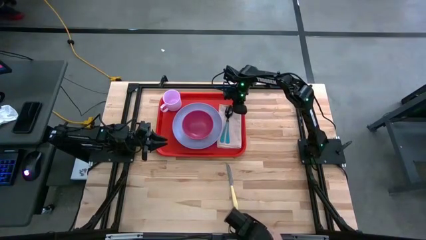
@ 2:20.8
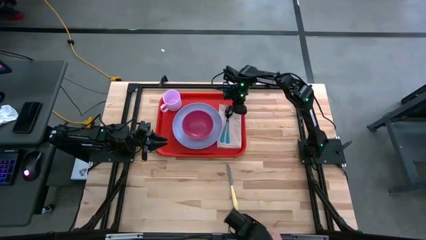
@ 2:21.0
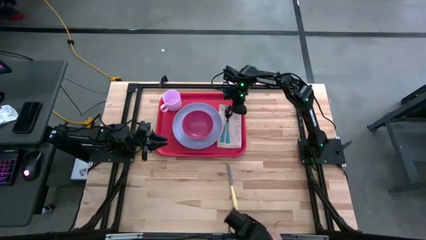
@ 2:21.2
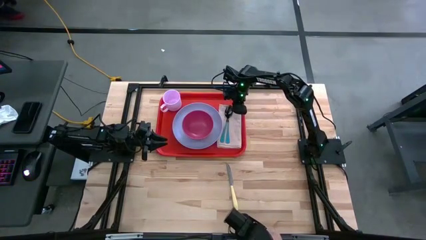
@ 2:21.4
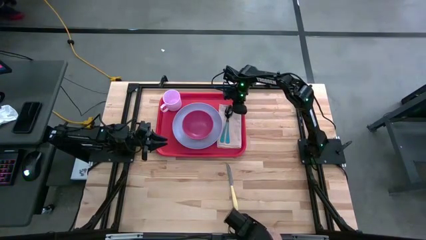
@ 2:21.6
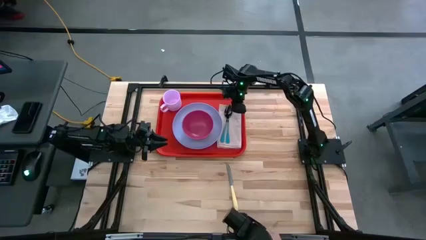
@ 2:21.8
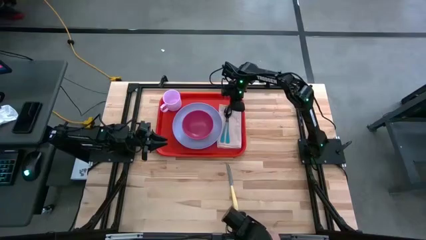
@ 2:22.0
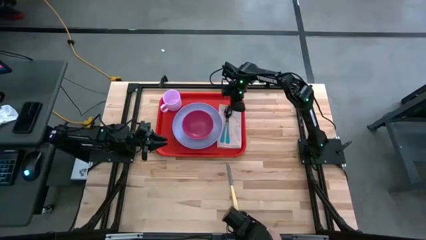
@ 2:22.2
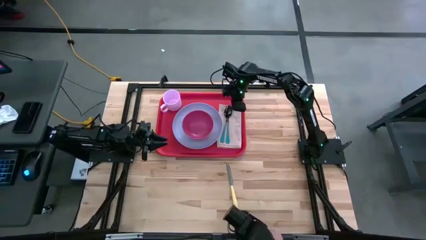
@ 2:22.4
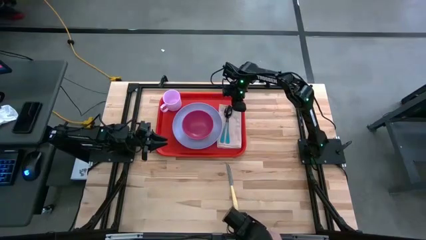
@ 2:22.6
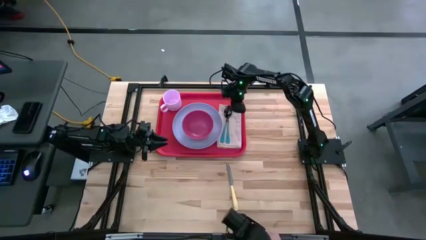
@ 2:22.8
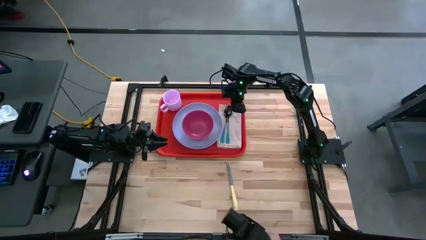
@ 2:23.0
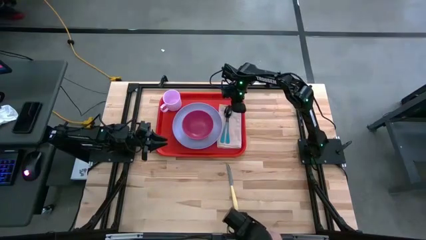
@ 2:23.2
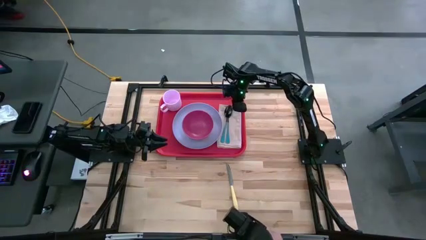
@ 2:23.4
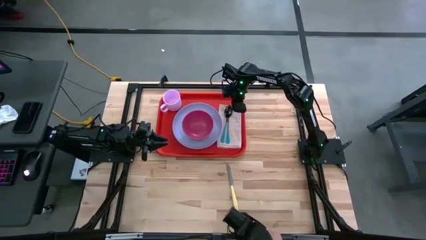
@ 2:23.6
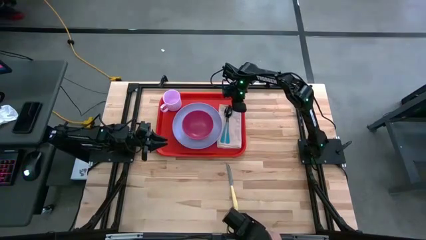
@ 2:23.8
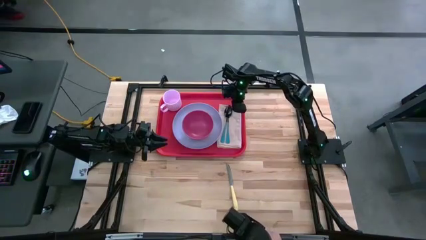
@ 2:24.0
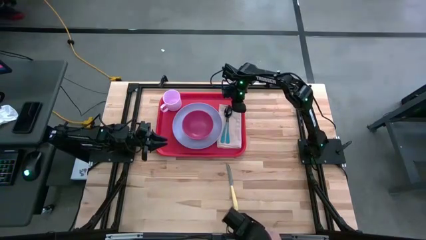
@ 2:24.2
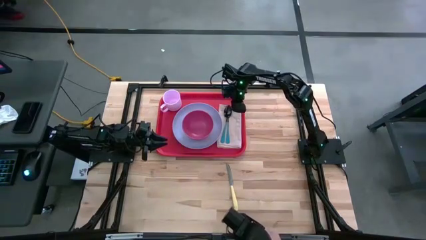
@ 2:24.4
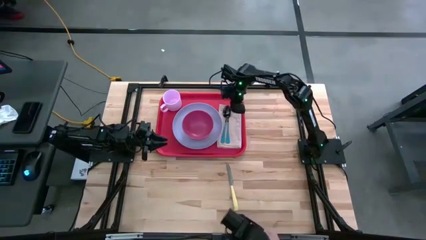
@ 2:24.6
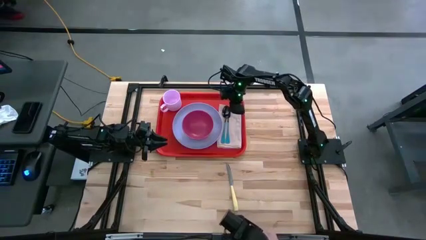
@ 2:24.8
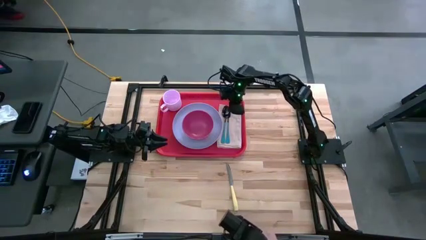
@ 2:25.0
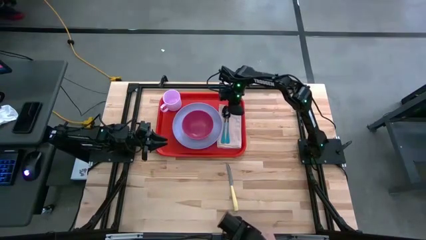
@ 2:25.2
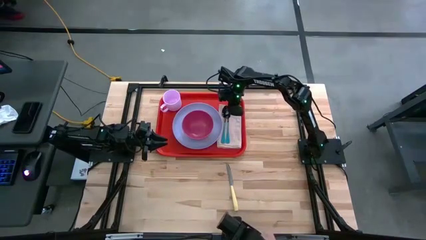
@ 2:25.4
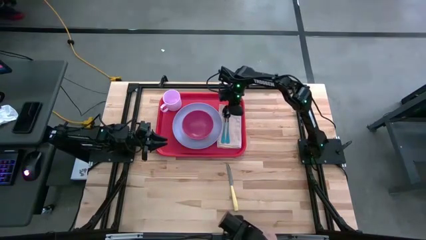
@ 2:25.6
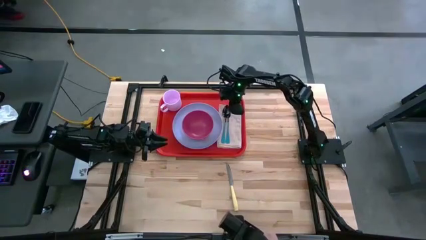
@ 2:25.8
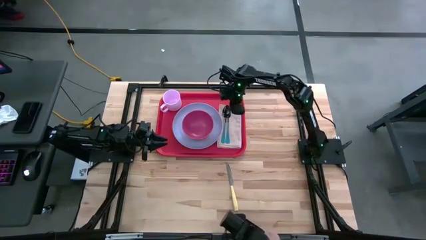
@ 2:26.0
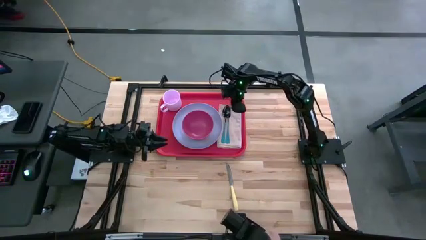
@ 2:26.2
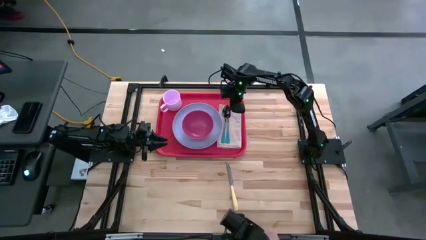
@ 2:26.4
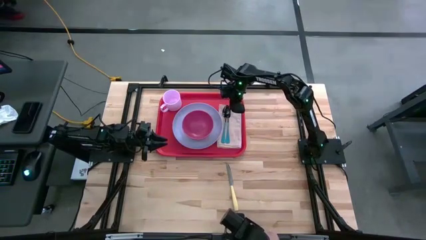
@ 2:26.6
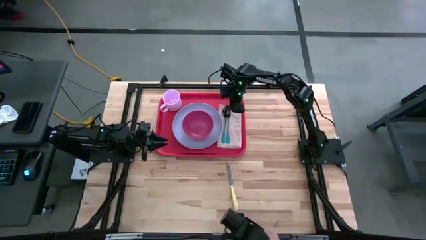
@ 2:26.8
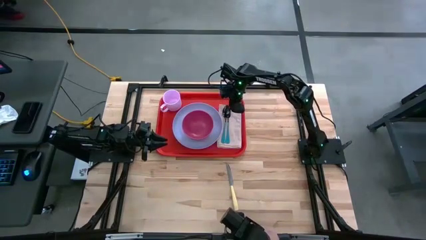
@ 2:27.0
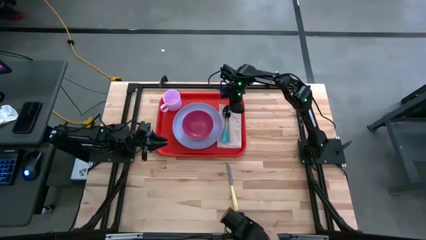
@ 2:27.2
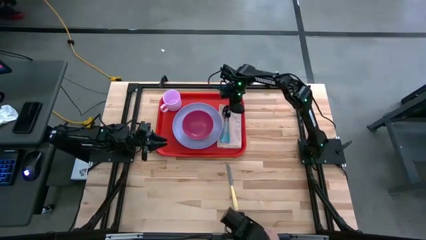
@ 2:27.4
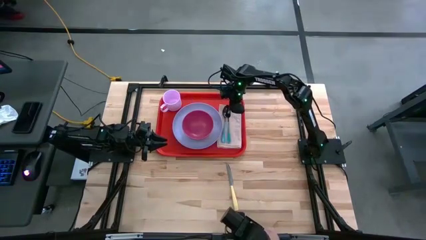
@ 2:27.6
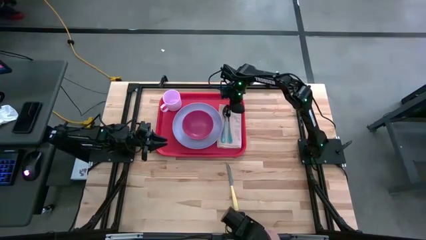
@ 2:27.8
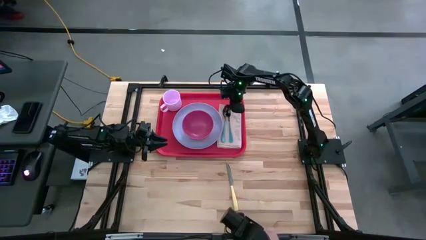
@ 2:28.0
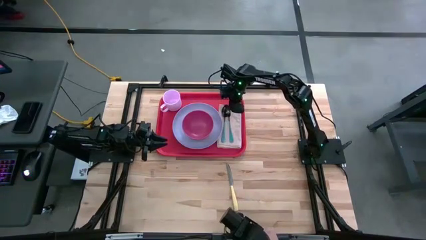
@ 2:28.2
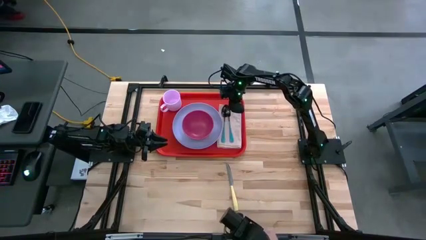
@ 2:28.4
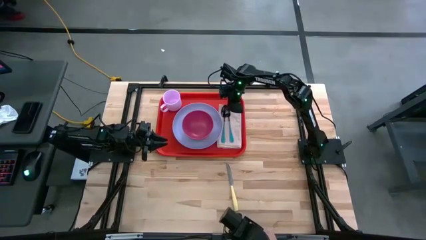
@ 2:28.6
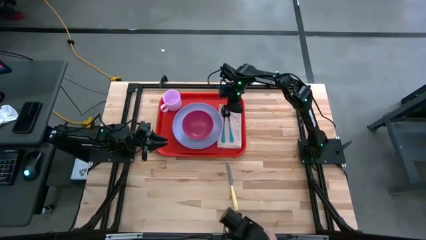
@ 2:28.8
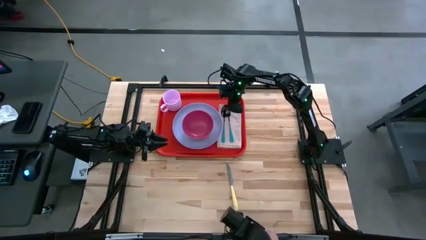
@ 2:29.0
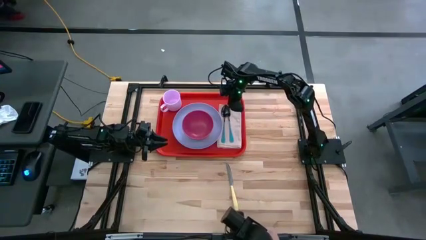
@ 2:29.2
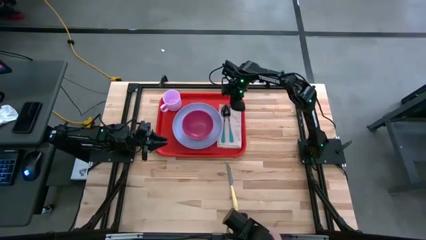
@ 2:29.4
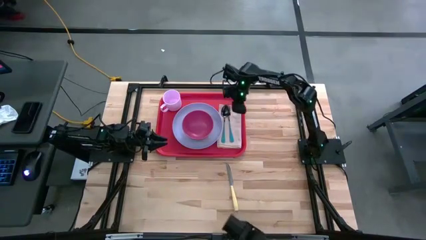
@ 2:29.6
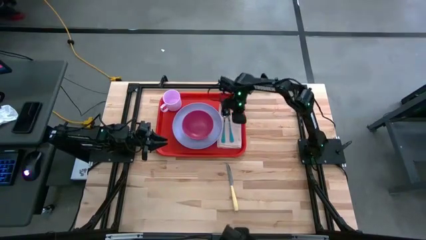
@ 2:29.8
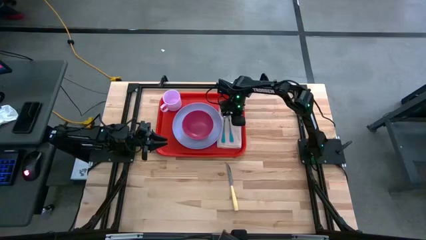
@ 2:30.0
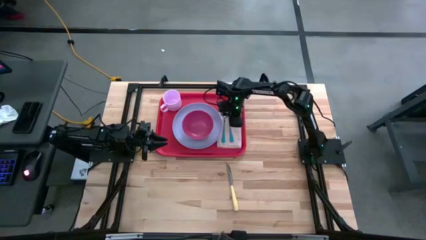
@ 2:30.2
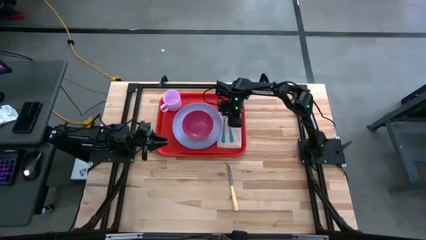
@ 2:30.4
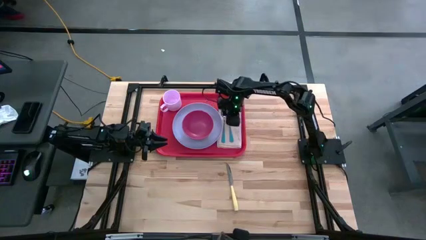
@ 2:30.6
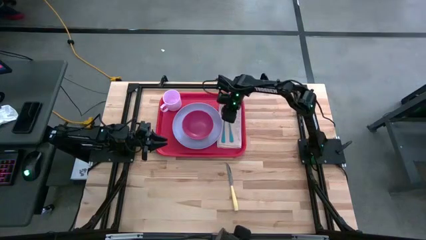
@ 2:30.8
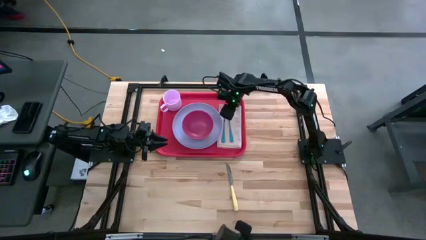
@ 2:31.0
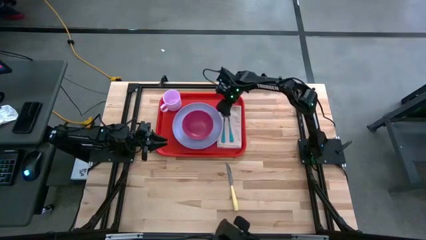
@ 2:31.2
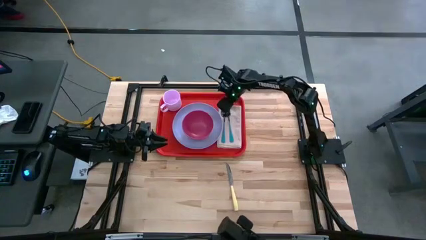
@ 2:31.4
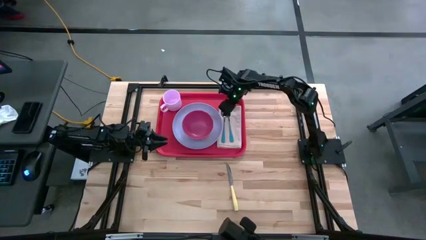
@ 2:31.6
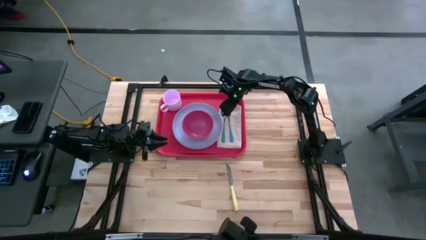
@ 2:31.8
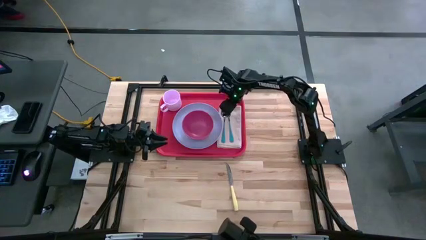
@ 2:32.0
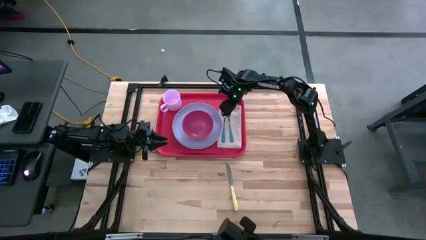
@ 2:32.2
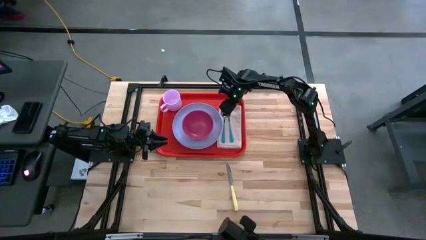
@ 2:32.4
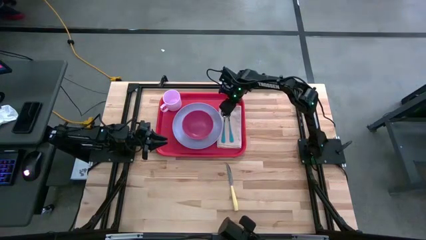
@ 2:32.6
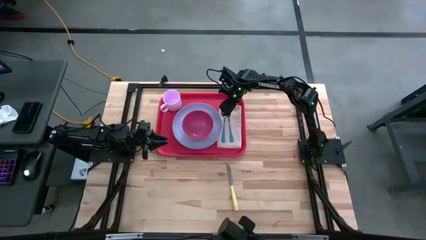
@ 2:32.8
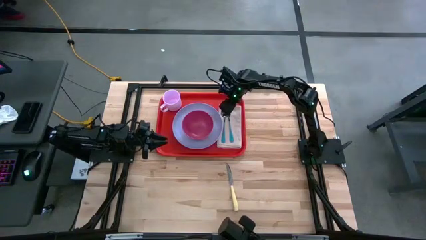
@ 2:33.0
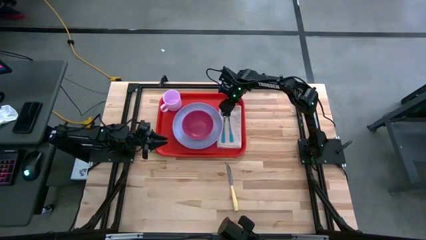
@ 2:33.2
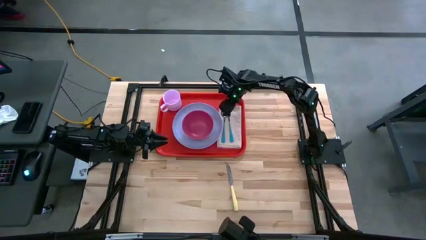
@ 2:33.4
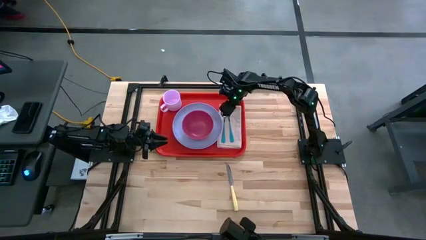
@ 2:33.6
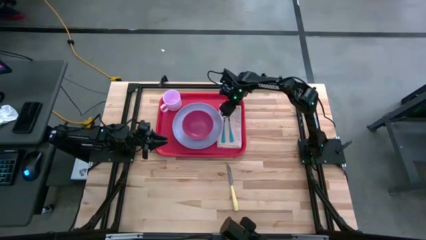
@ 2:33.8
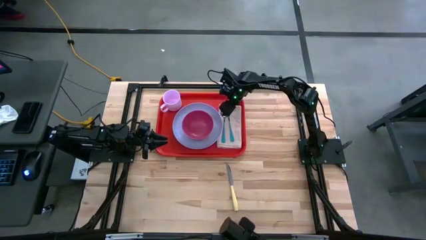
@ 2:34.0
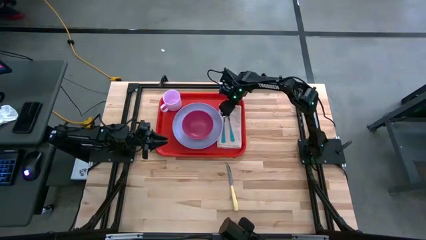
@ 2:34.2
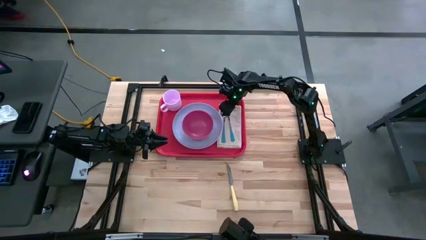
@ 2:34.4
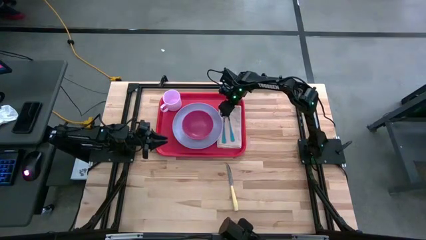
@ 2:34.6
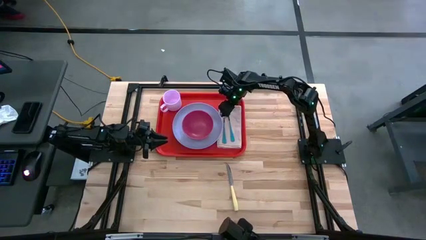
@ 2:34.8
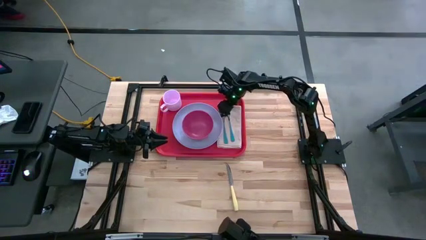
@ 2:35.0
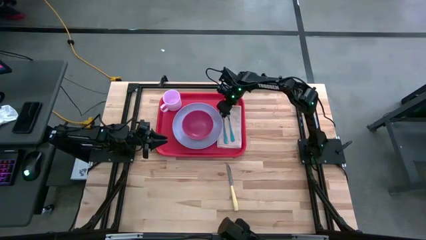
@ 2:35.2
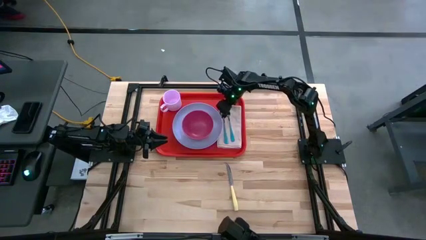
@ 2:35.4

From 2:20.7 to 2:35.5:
Task: Set up tray
Put the blue spoon on the white table napkin to the left of the blue fork
